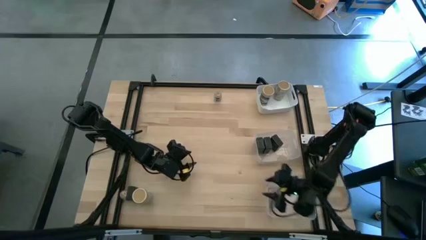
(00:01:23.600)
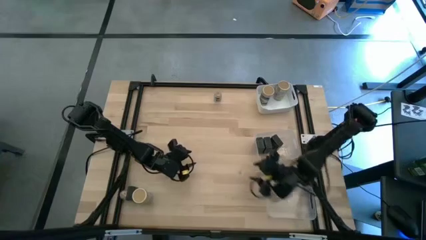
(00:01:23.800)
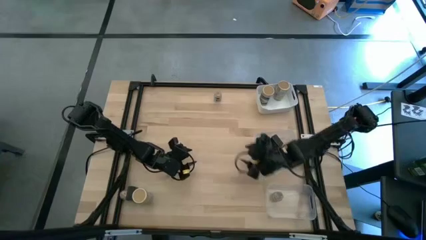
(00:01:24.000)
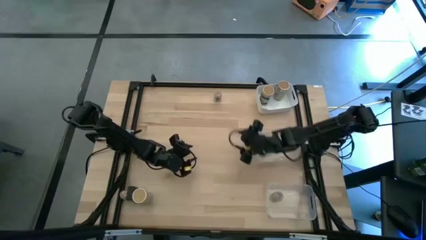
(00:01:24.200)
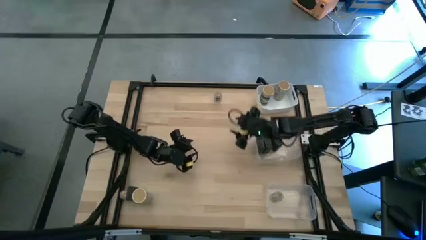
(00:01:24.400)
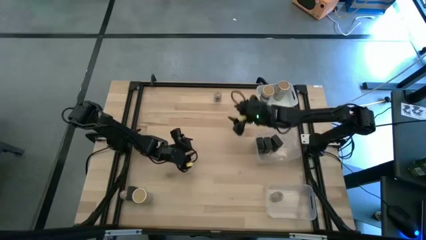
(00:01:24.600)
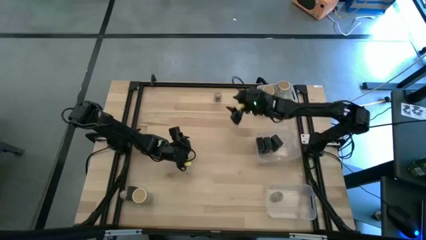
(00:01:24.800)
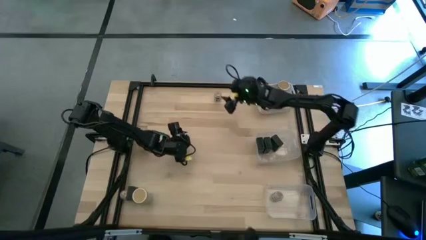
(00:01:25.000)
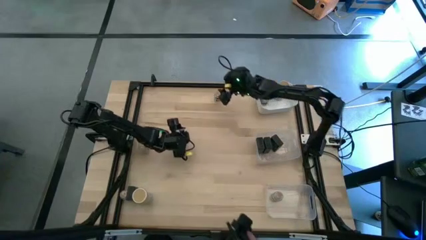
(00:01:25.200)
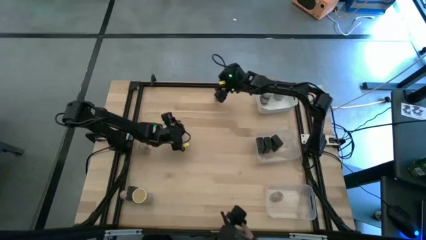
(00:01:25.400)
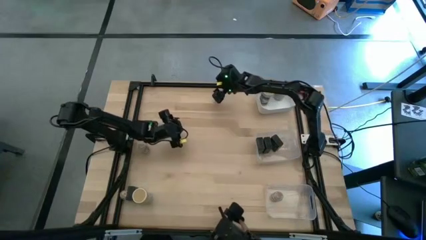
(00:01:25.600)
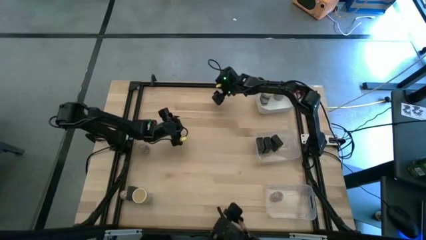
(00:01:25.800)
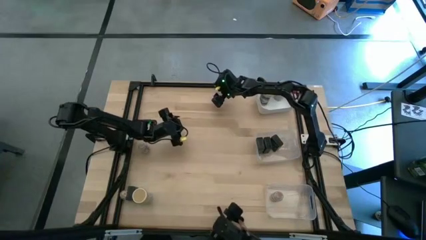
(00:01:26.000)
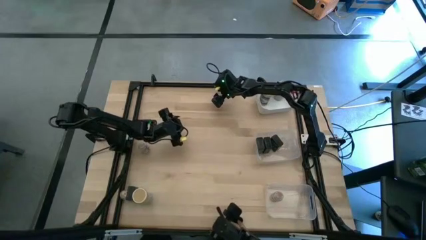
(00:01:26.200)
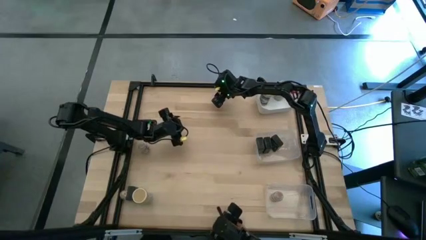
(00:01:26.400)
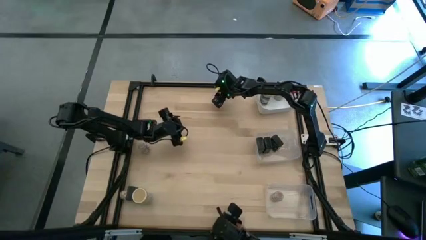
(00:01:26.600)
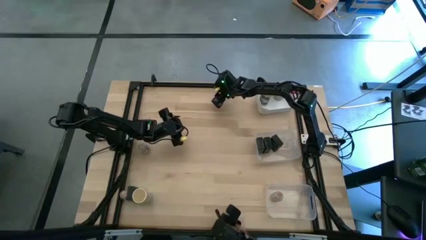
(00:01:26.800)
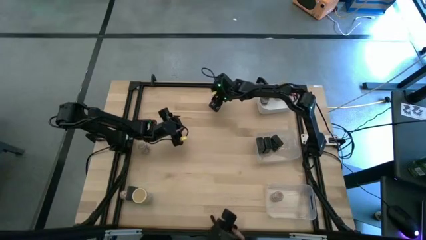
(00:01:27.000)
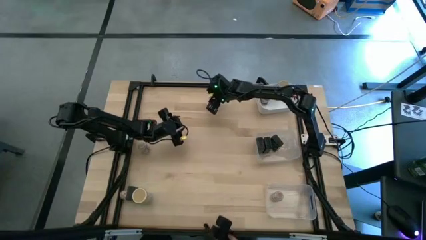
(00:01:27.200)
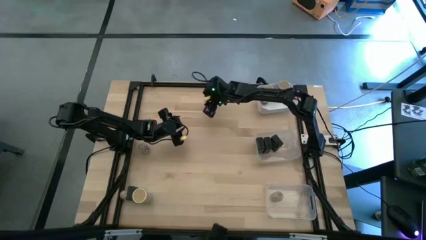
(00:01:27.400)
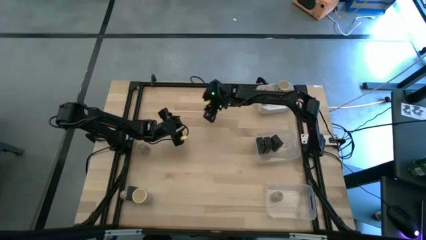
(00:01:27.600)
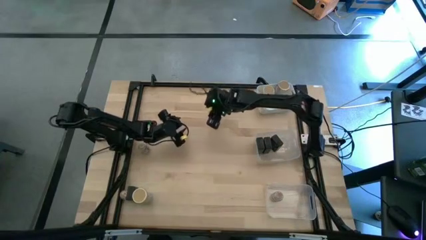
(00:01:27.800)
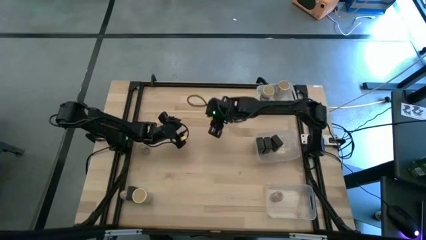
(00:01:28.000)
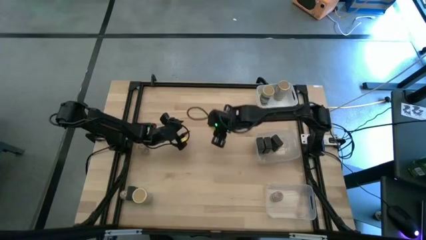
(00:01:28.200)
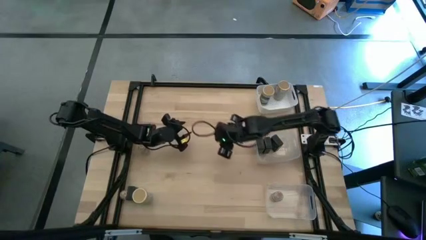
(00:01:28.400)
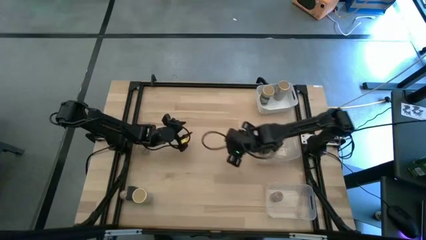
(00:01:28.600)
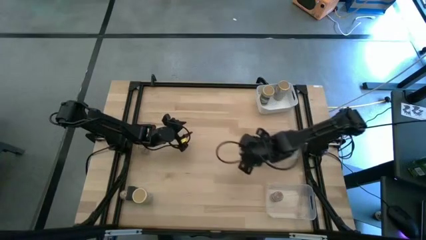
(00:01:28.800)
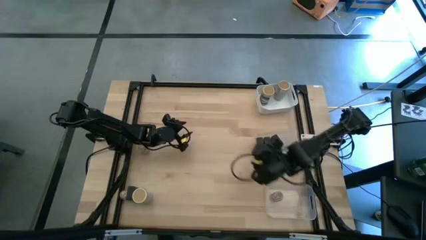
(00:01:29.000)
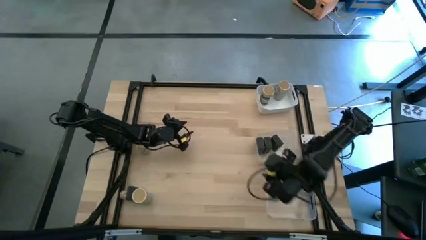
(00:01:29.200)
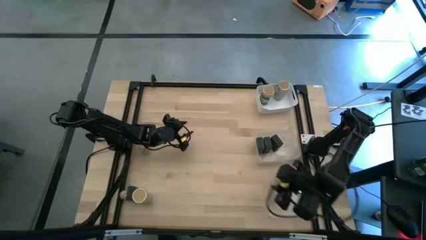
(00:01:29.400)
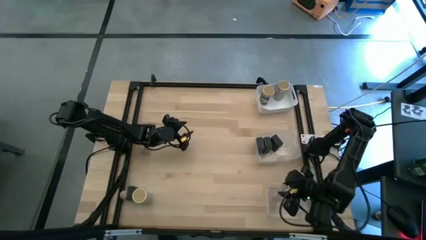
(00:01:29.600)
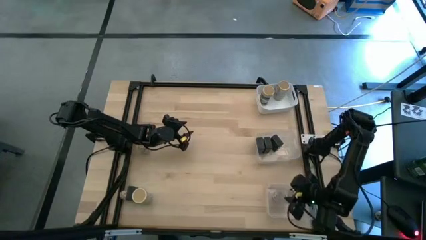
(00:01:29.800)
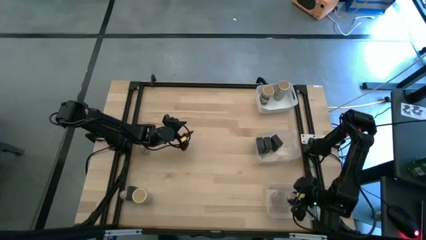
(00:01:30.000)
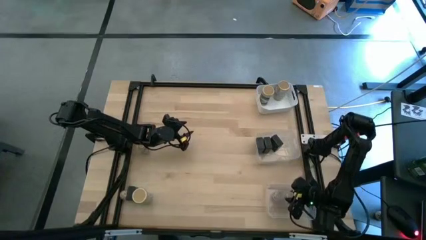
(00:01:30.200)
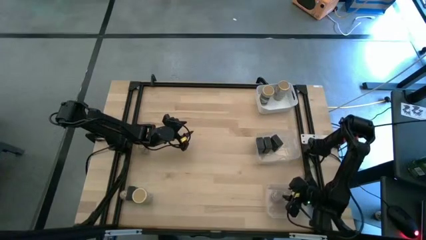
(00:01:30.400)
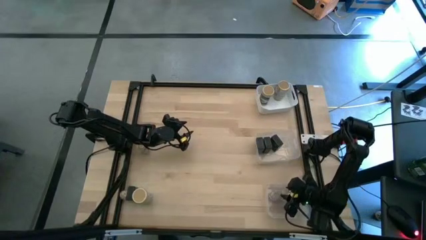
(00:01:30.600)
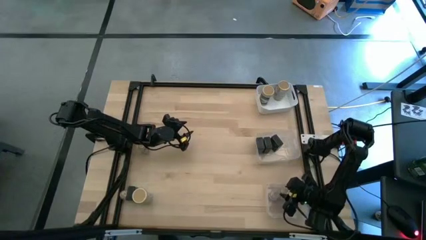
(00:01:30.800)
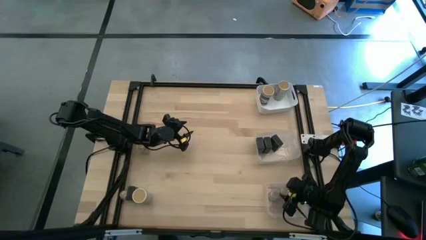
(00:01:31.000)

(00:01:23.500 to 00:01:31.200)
Task: Sort spices by type
Put the top right transparent seasoning bottle into the bottom transparent bin

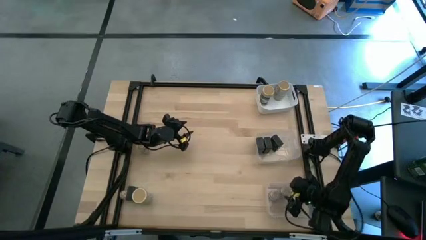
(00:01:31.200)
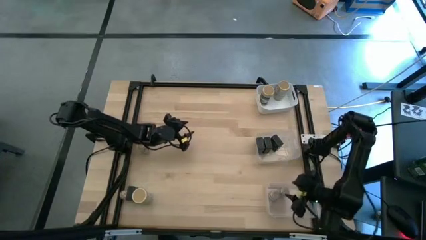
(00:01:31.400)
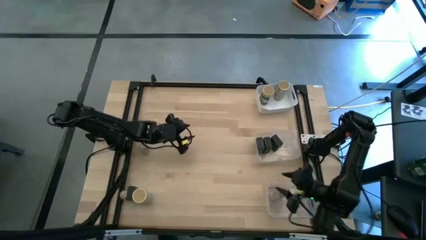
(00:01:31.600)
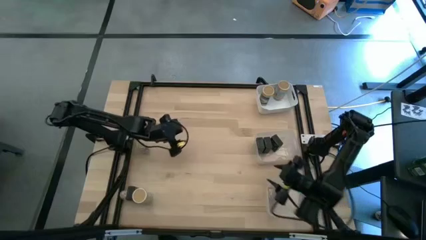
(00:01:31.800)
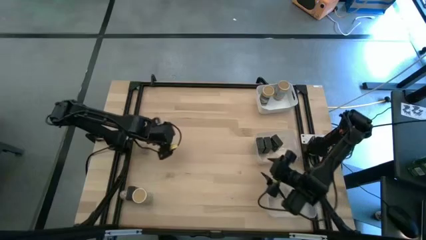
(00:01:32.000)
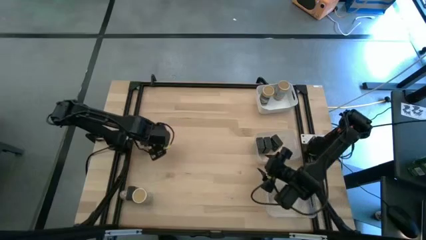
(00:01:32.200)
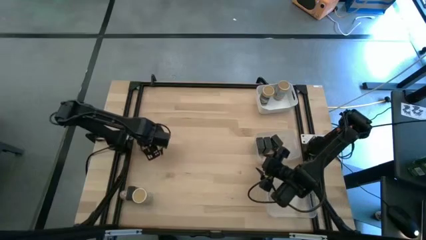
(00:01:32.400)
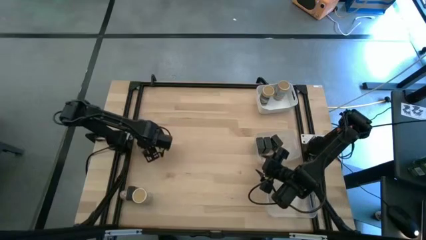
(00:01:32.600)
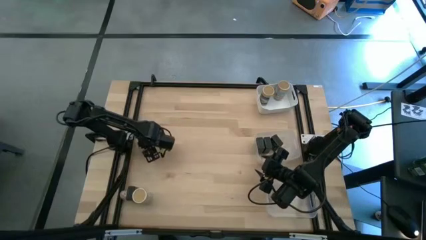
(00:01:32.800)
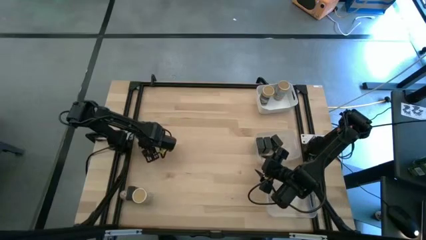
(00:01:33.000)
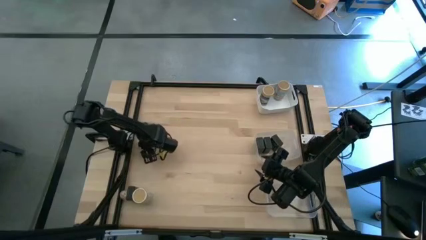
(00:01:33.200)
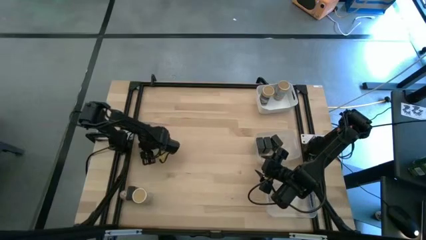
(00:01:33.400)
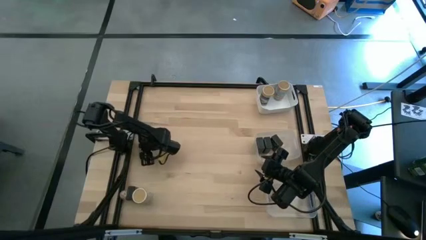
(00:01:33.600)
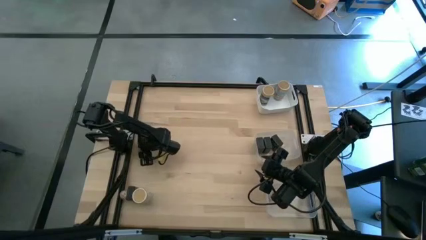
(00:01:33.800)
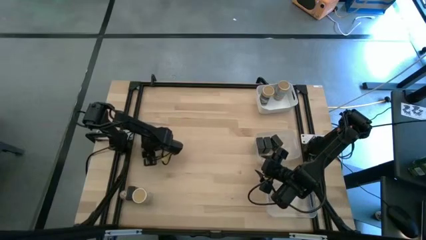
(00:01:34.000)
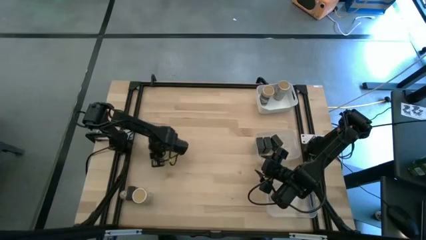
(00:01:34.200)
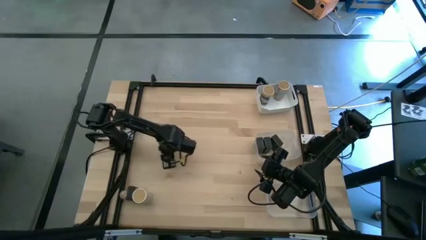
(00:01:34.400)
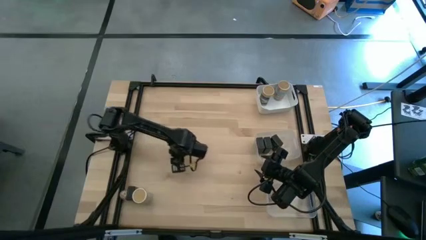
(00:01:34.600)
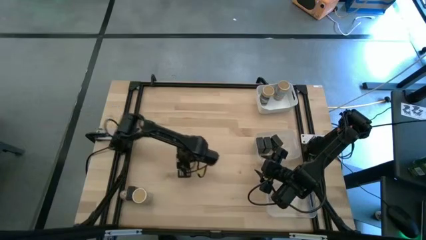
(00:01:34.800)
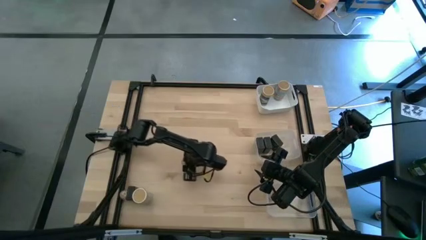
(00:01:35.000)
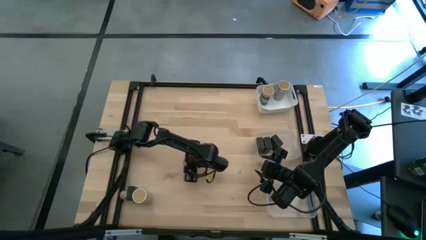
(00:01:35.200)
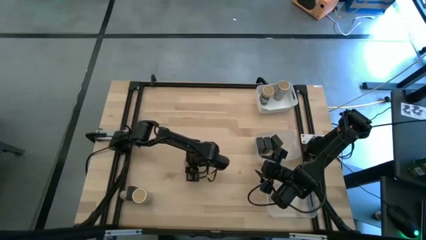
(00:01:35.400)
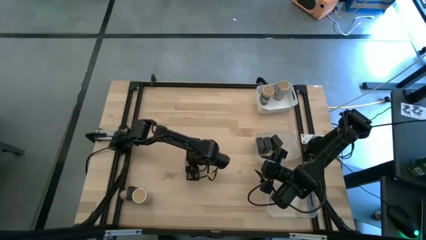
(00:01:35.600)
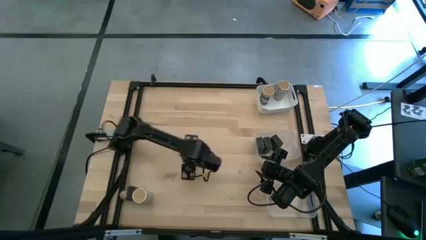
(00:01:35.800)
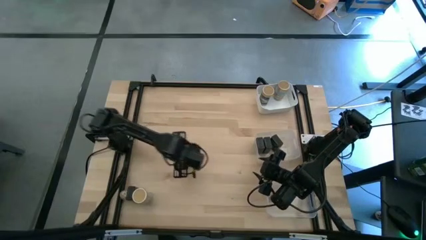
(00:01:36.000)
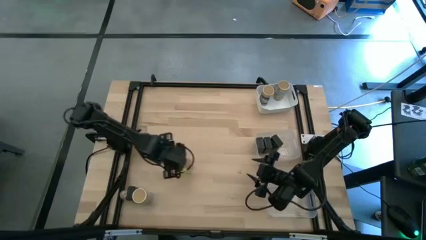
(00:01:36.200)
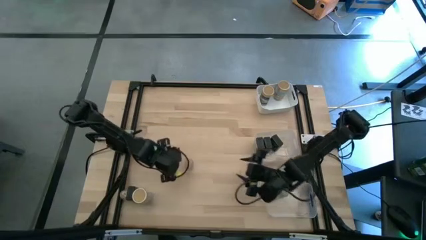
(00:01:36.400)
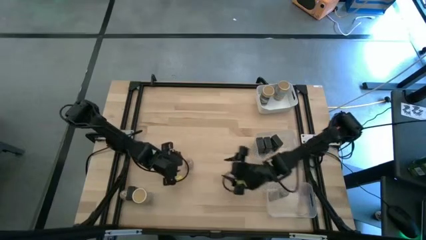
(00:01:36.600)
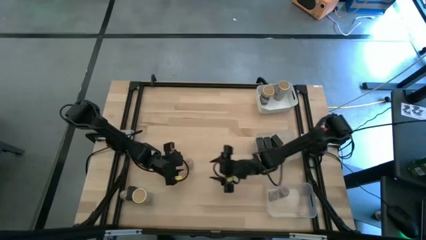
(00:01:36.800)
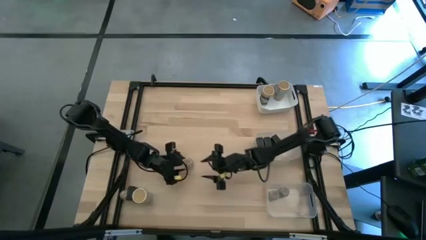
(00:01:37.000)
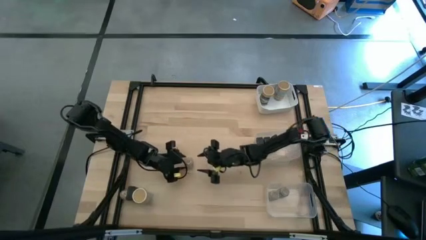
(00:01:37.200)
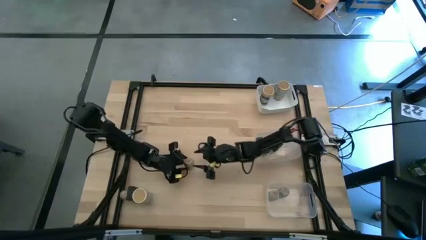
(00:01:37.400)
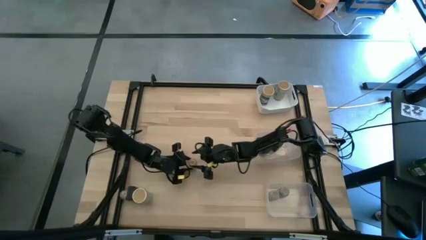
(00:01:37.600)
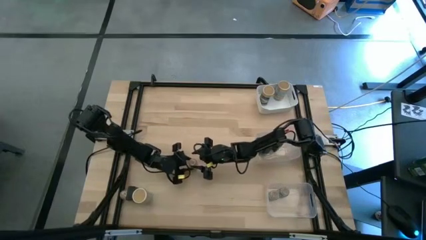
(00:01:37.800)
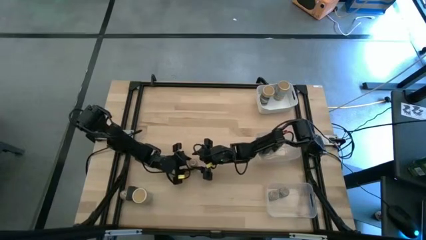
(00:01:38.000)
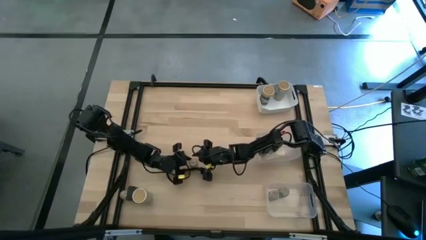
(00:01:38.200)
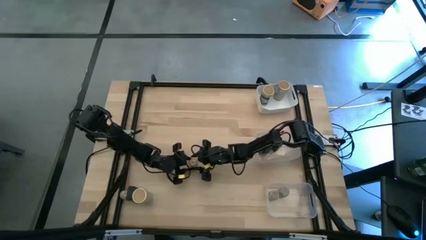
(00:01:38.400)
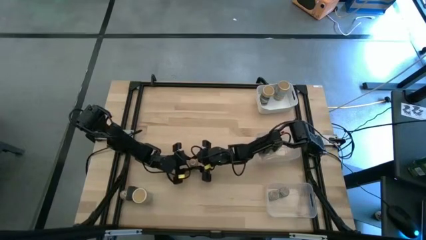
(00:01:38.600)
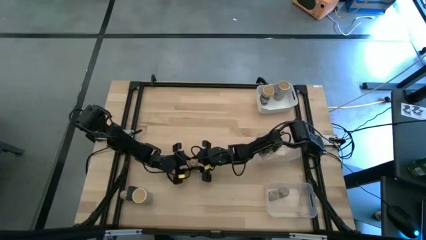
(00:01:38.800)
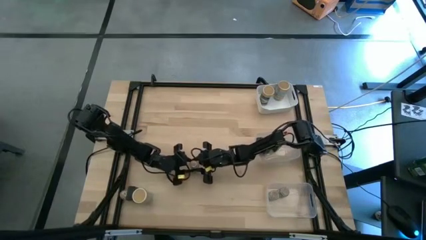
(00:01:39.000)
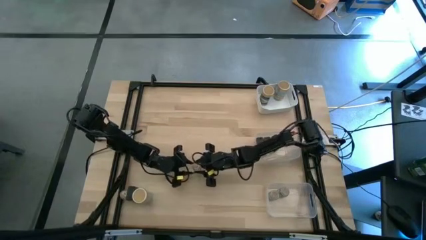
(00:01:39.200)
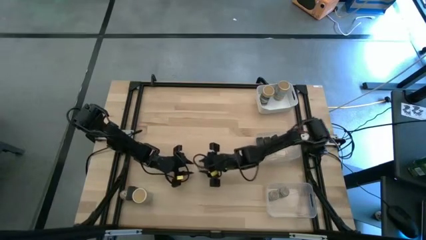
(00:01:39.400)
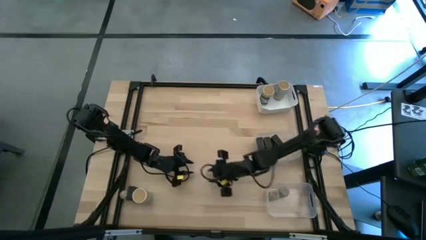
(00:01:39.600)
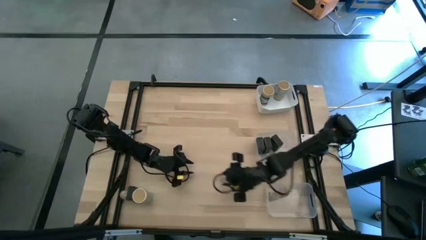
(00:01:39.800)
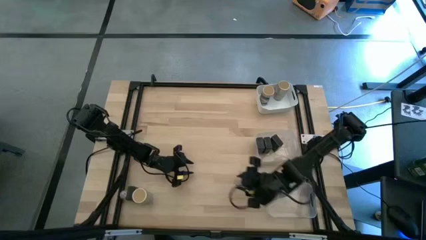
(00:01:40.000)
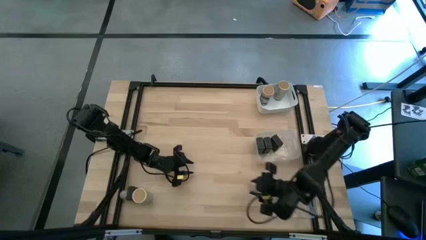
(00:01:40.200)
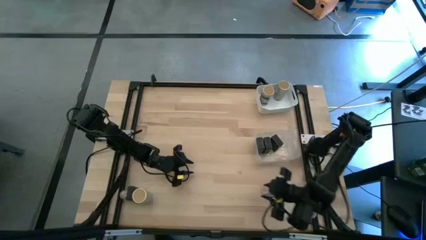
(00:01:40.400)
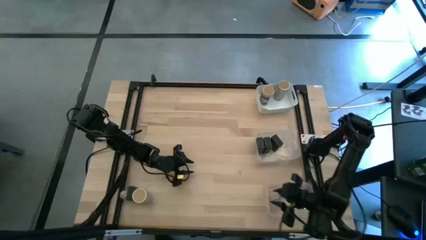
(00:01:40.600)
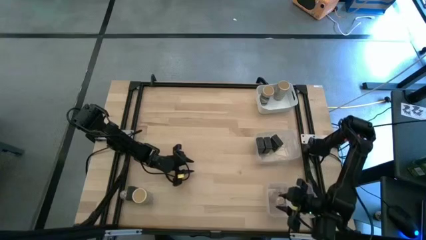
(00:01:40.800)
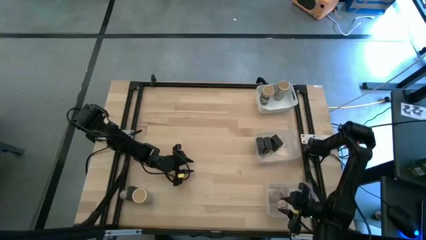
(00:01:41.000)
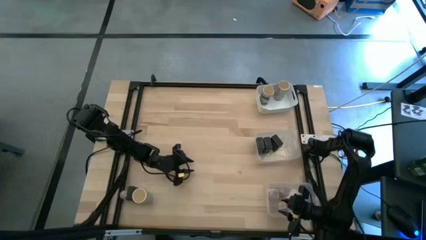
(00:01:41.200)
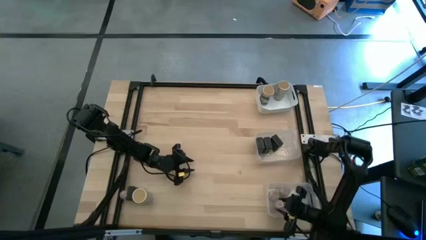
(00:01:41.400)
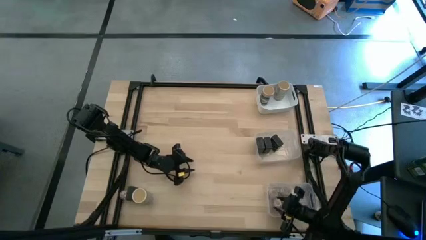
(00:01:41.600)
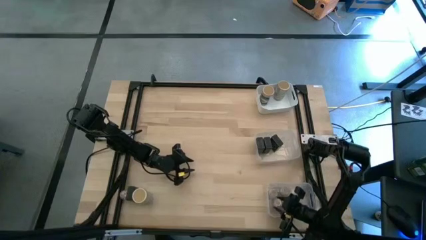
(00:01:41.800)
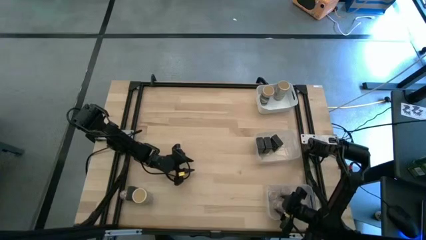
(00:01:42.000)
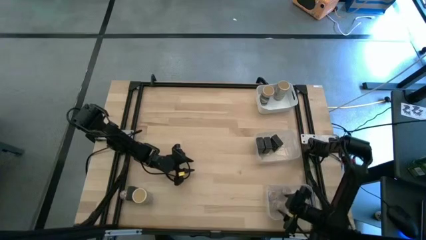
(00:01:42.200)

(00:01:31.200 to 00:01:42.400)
Put the middle left transparent seasoning bottle into the bottom transparent bin
